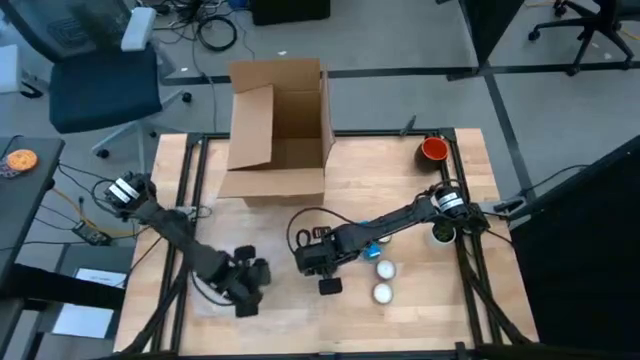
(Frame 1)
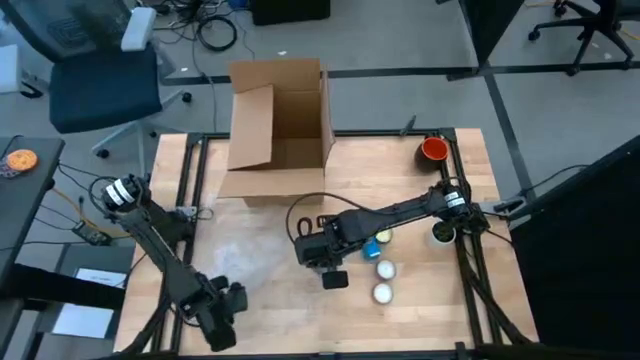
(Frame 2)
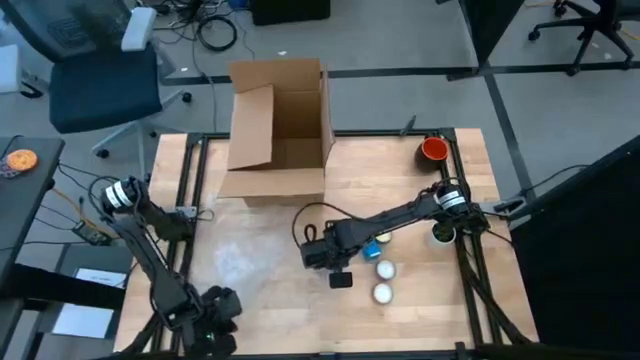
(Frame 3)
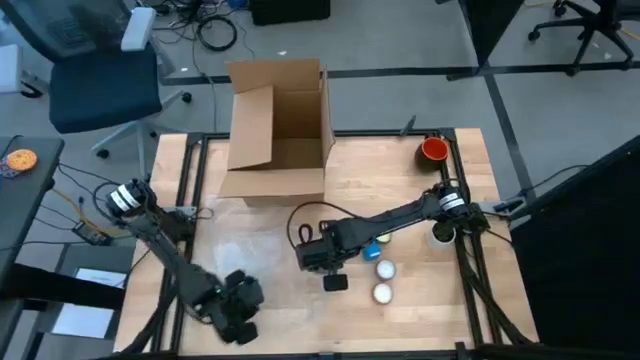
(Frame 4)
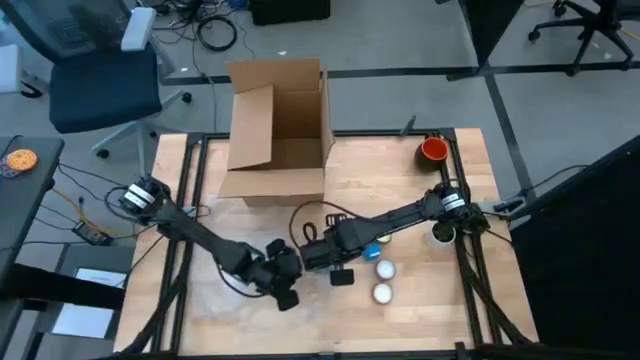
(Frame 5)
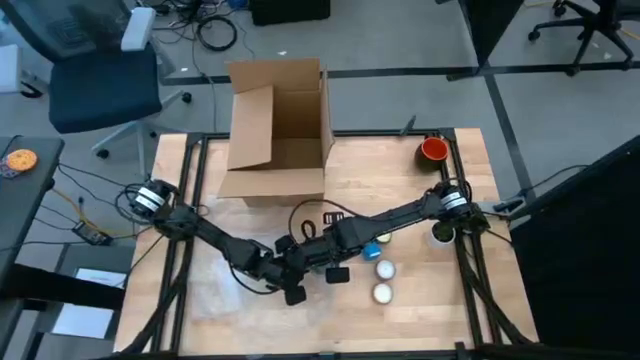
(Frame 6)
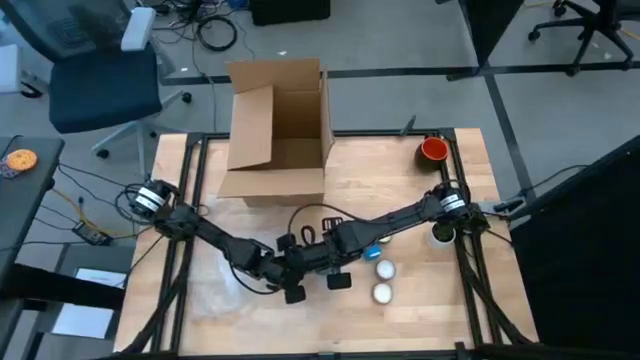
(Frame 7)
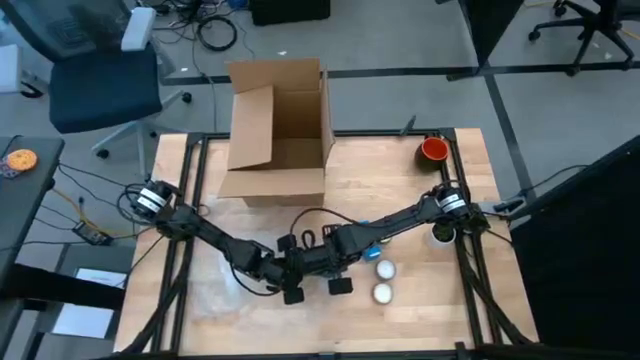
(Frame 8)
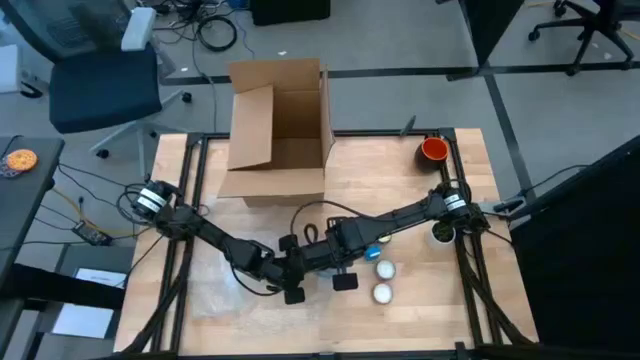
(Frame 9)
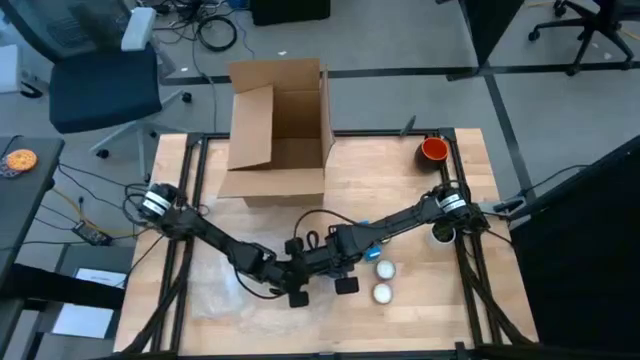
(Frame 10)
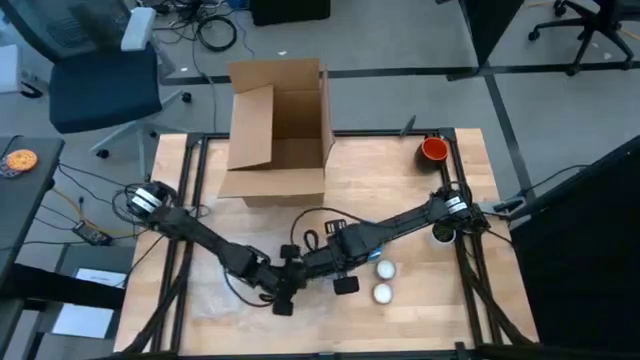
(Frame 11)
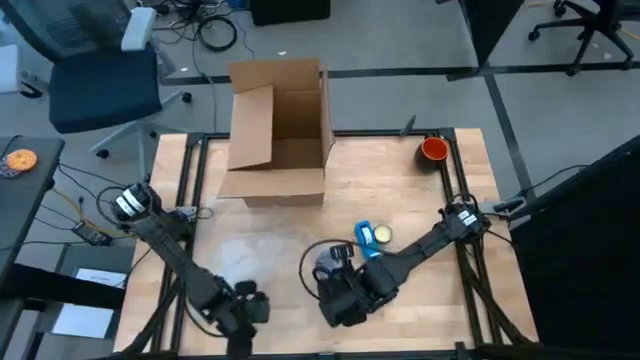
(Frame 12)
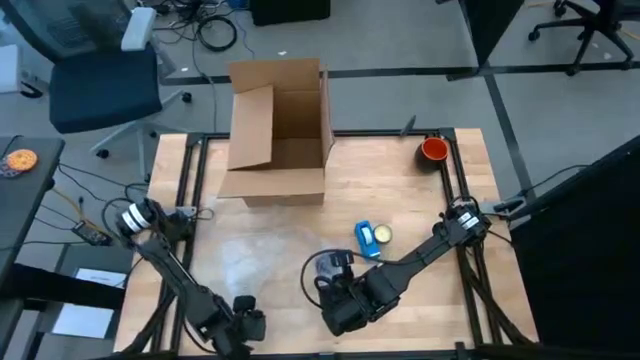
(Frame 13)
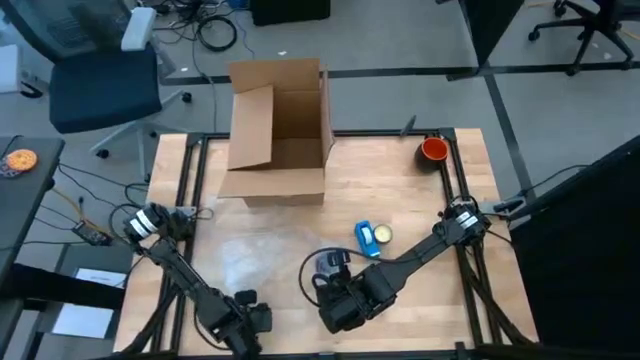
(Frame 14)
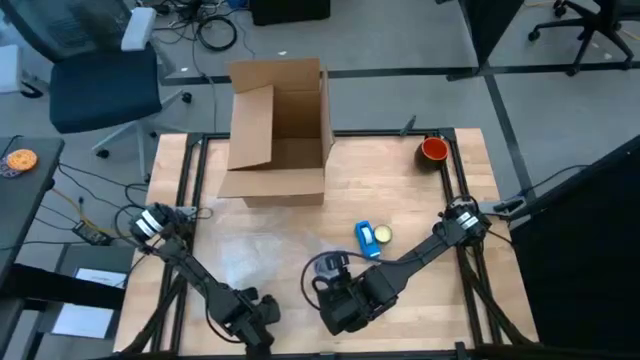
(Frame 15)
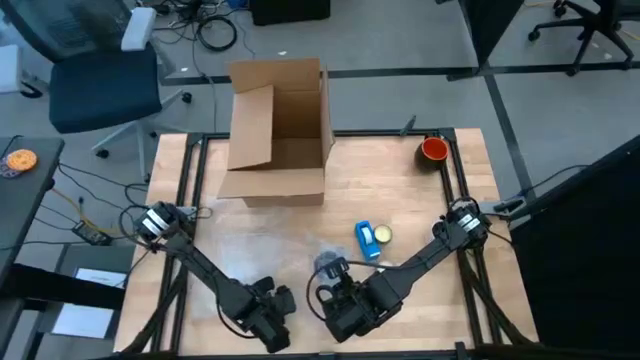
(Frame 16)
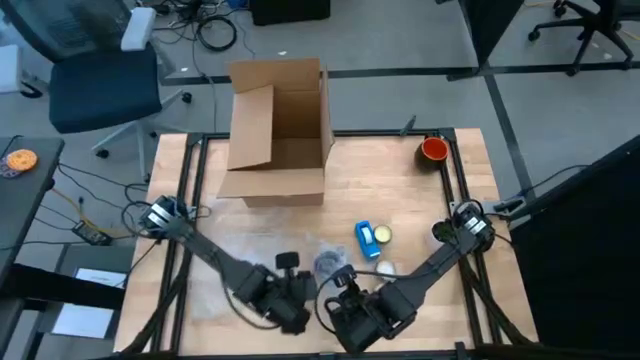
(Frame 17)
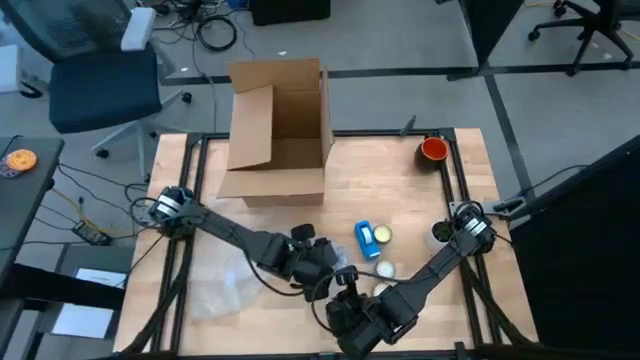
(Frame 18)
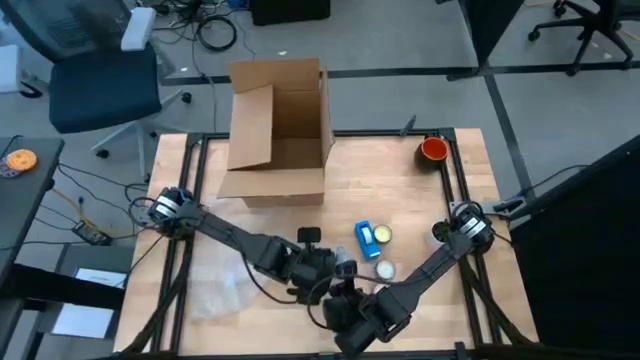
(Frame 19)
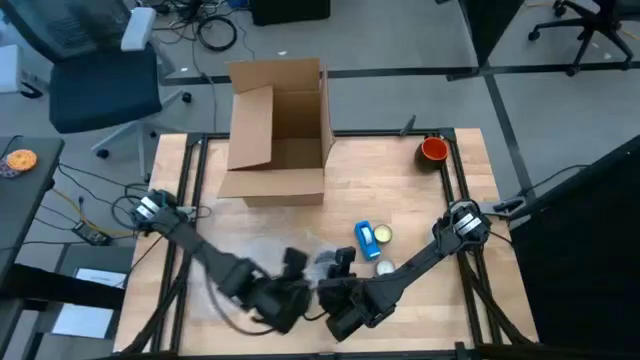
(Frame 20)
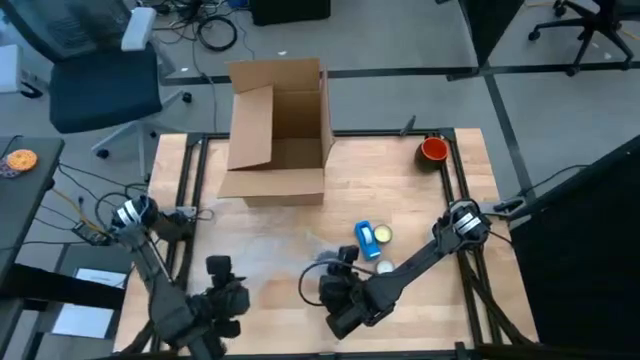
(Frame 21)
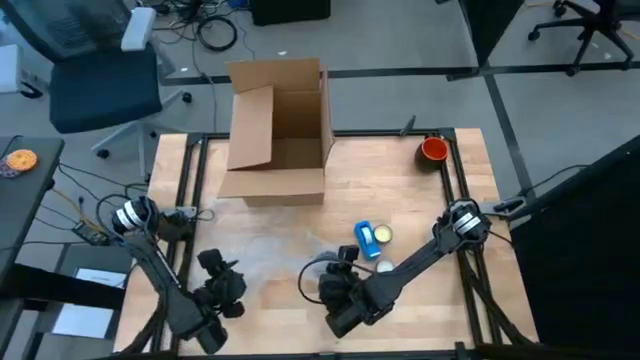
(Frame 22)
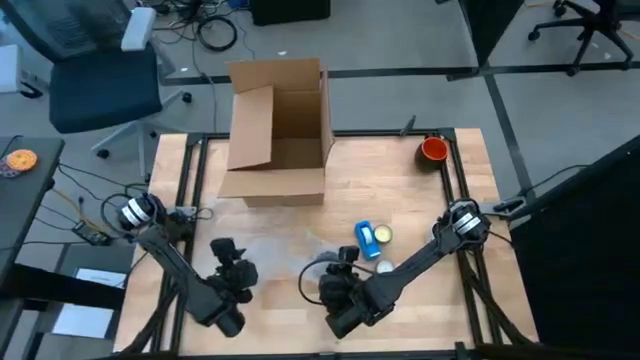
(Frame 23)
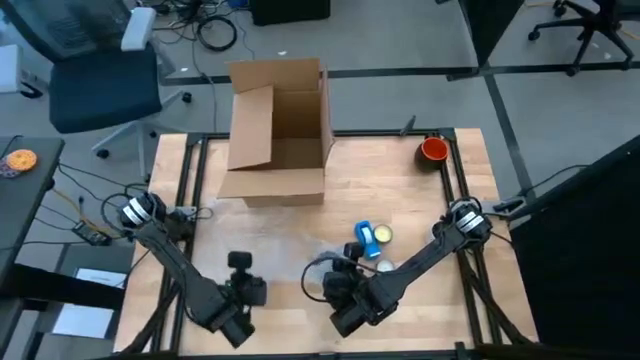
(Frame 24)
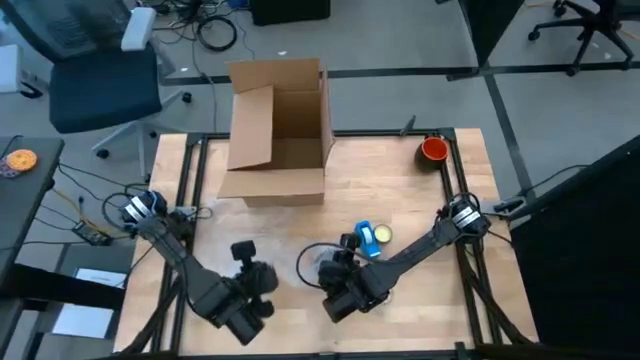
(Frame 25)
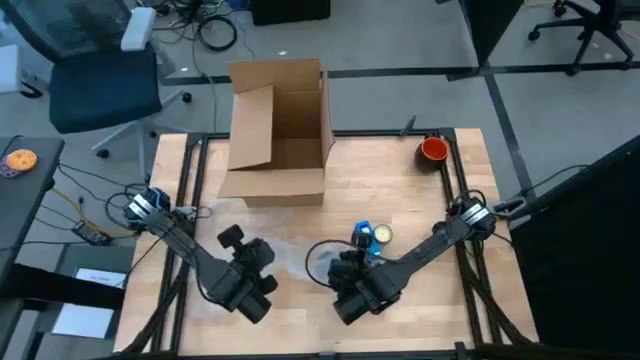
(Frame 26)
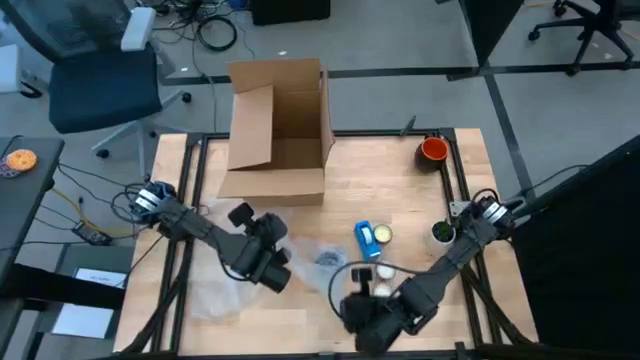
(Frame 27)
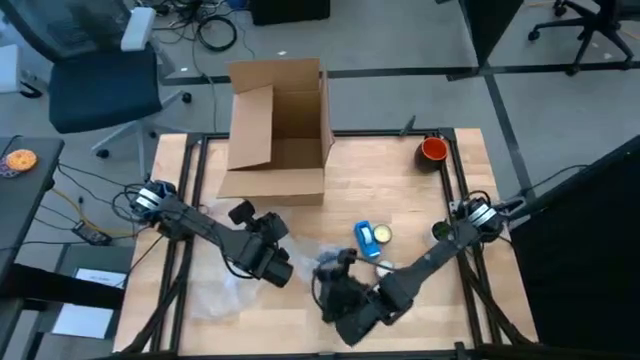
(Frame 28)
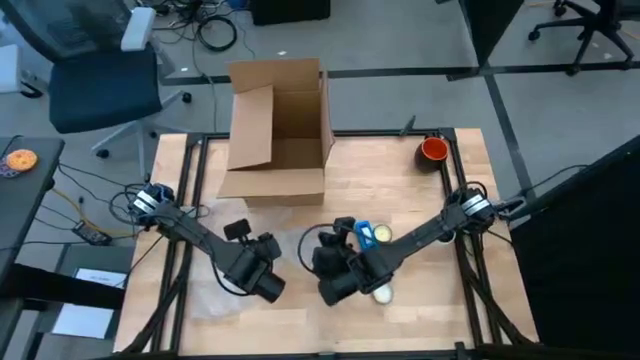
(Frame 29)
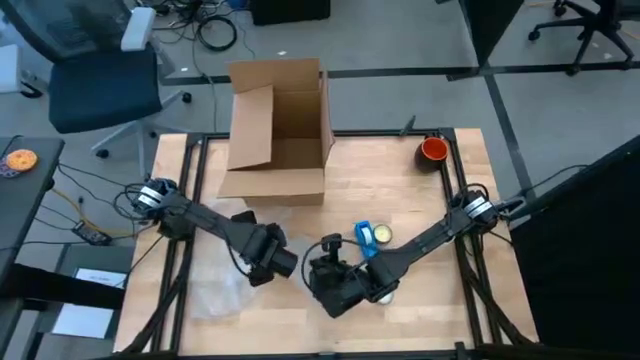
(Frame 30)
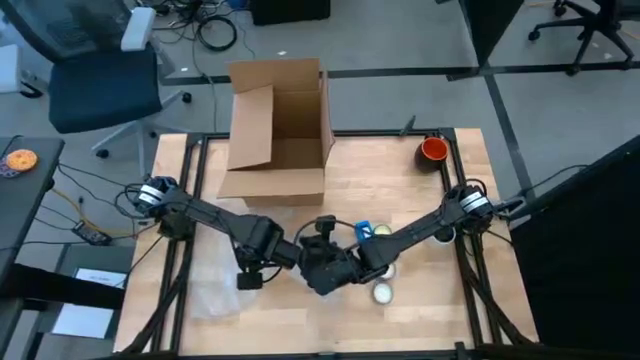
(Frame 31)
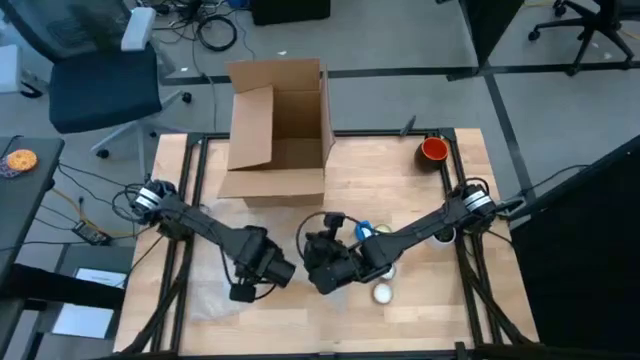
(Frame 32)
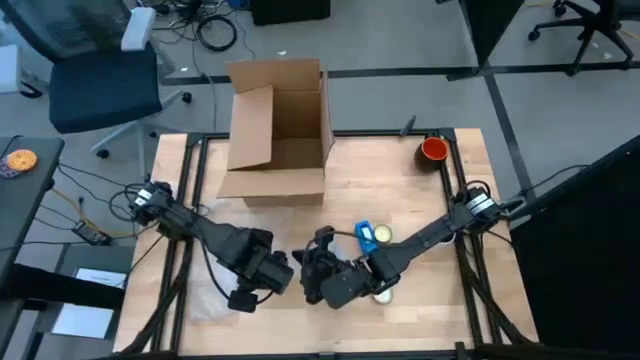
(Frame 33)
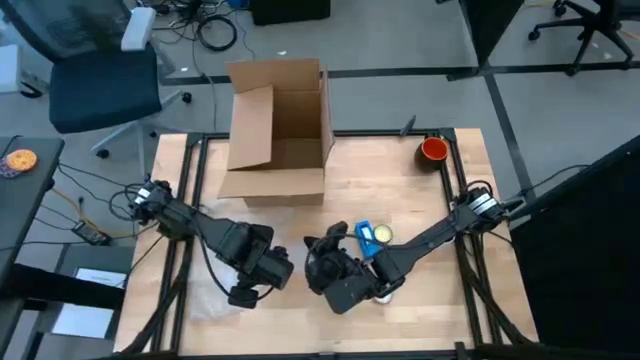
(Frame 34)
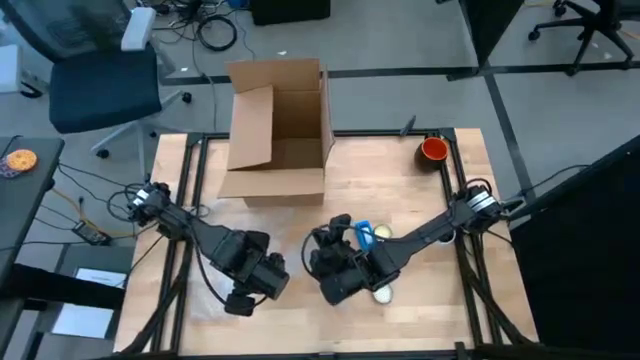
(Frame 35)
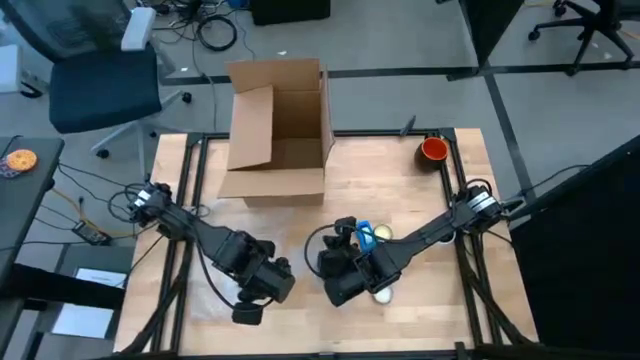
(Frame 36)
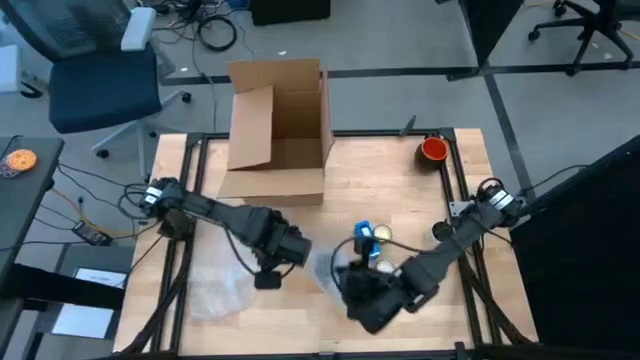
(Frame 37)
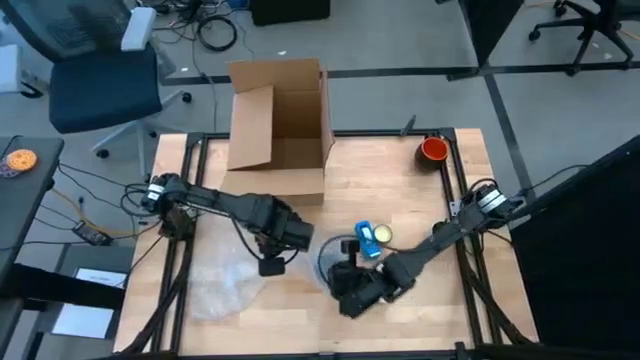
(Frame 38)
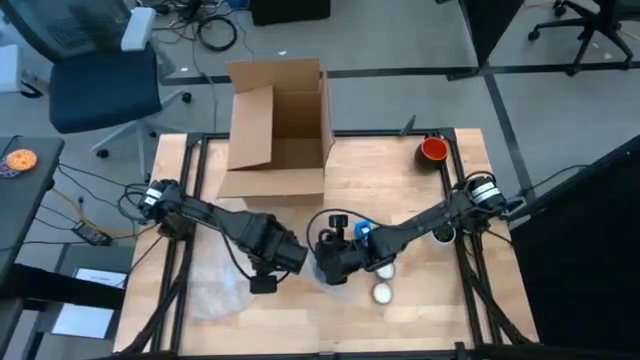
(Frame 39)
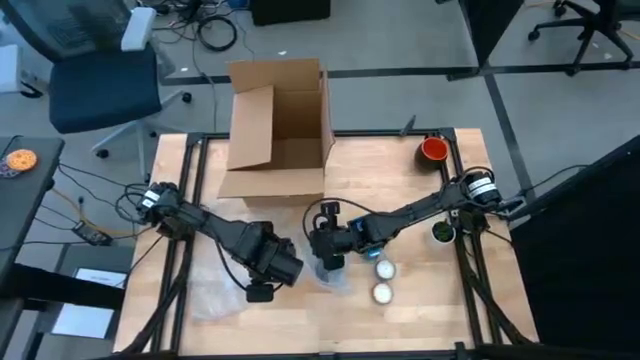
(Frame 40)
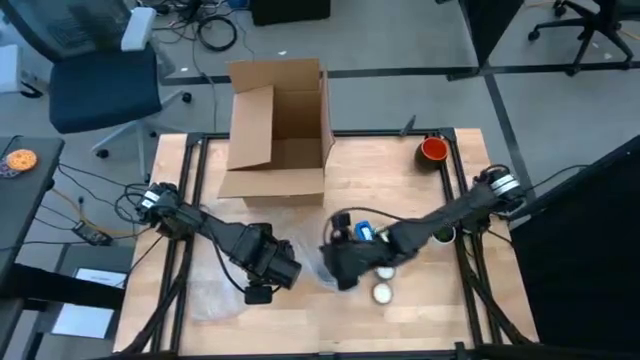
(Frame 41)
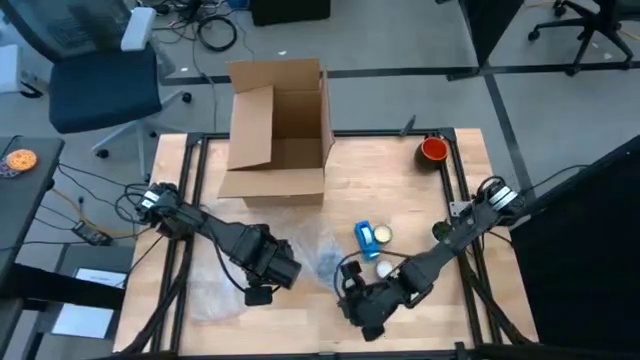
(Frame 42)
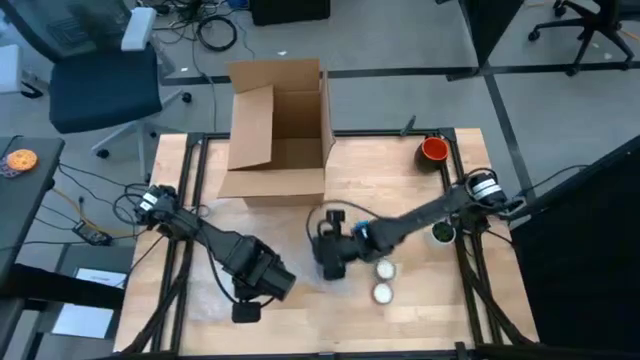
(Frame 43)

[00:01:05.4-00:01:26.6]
Task: wrap mug
Wrap the blue mug with the bubble wrap
